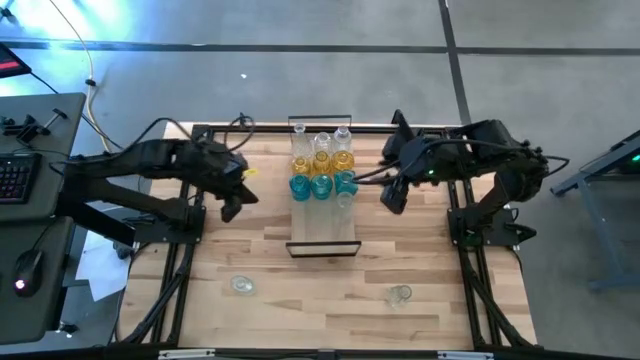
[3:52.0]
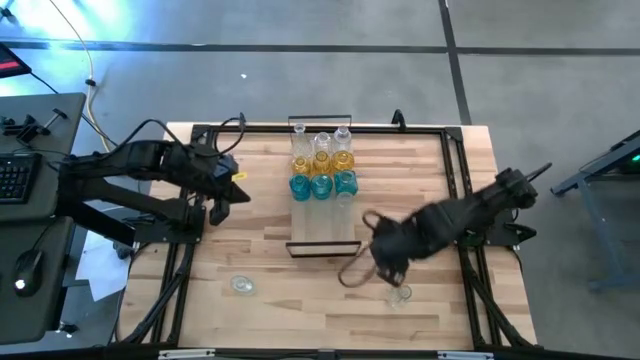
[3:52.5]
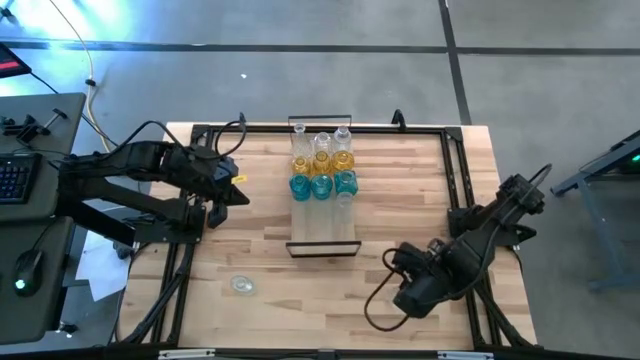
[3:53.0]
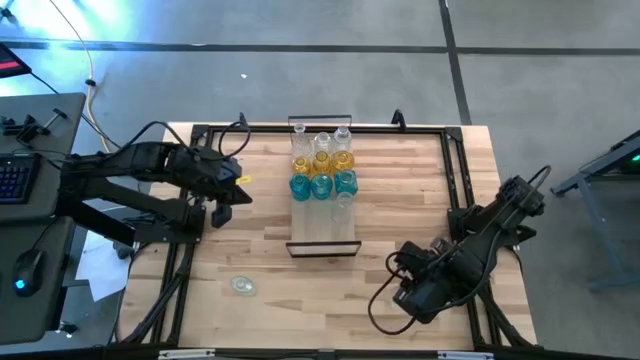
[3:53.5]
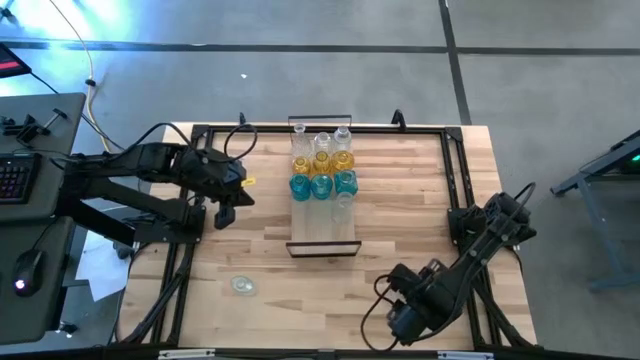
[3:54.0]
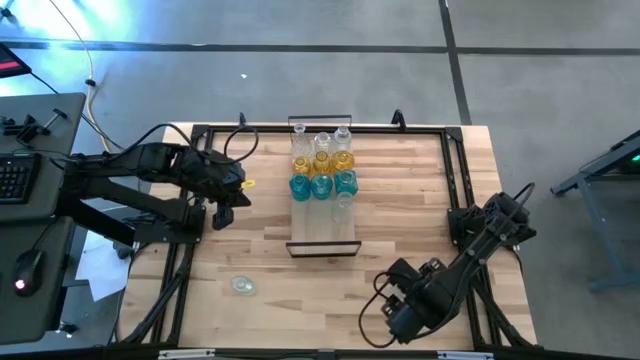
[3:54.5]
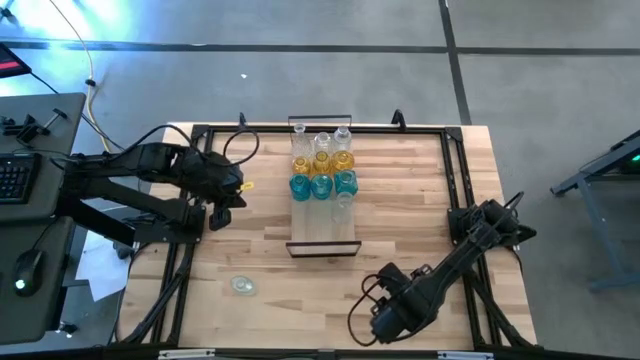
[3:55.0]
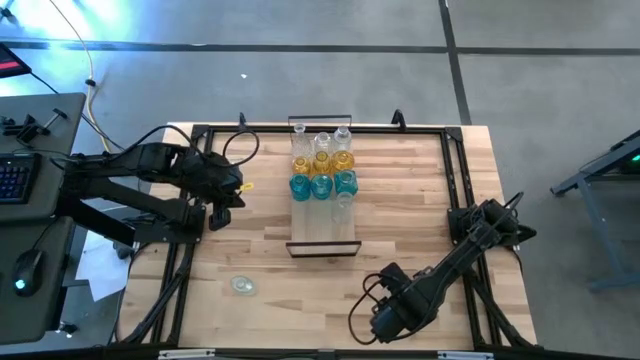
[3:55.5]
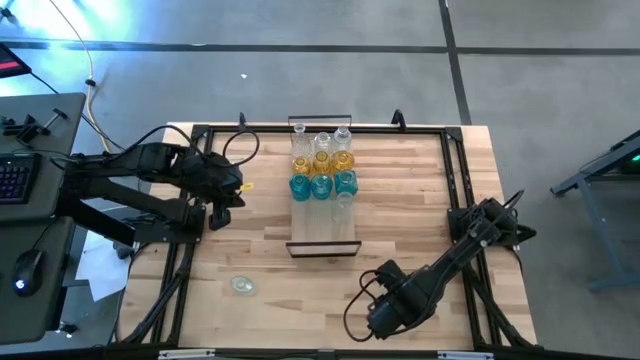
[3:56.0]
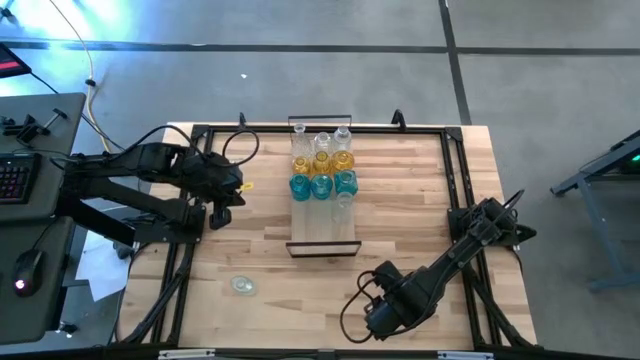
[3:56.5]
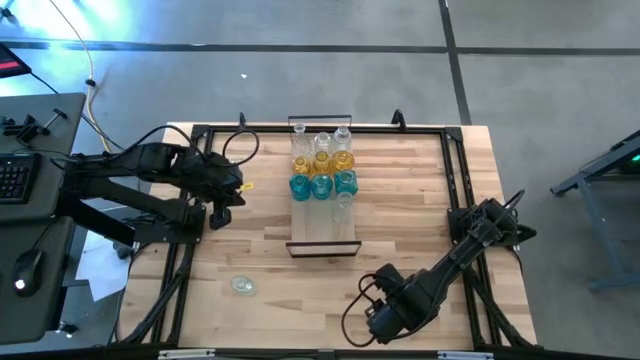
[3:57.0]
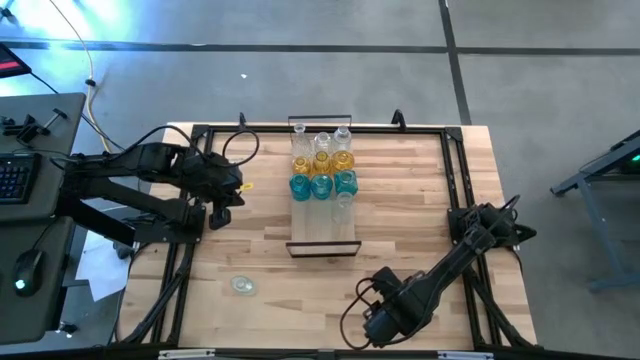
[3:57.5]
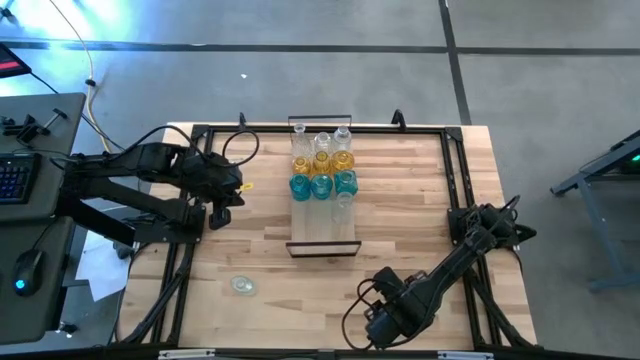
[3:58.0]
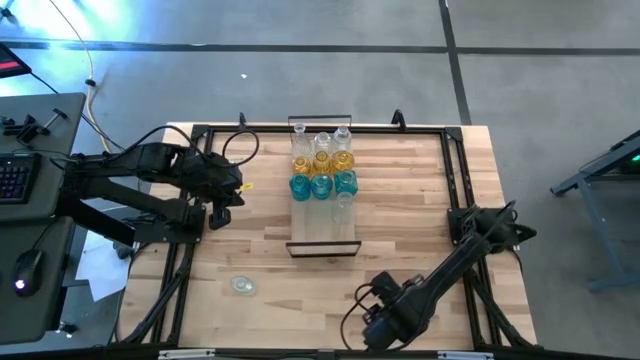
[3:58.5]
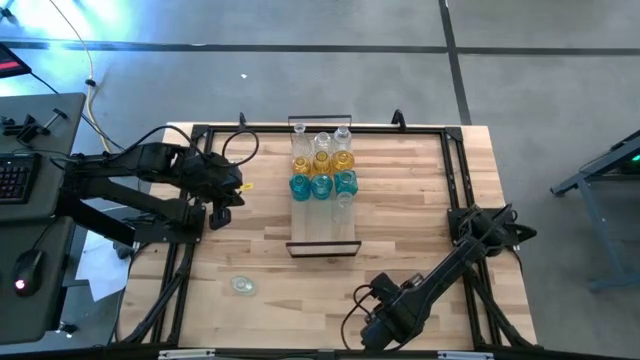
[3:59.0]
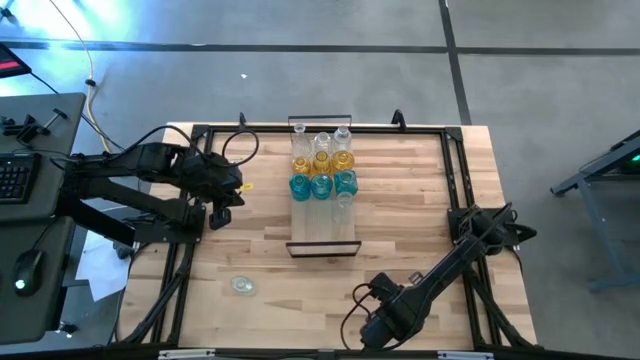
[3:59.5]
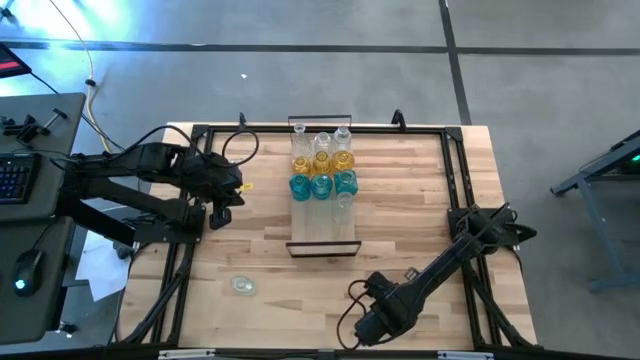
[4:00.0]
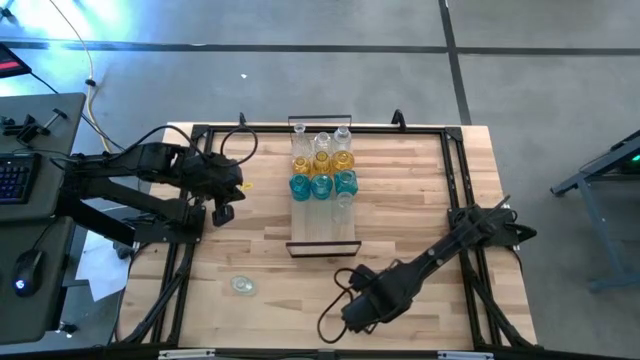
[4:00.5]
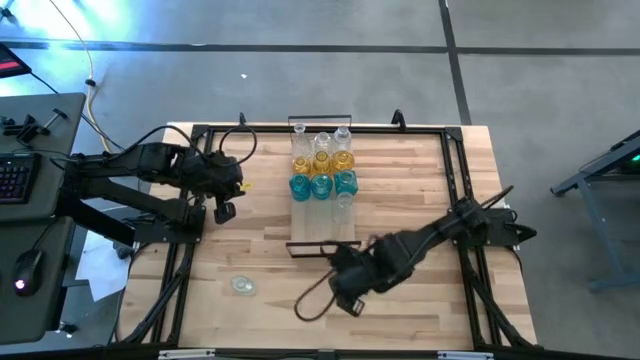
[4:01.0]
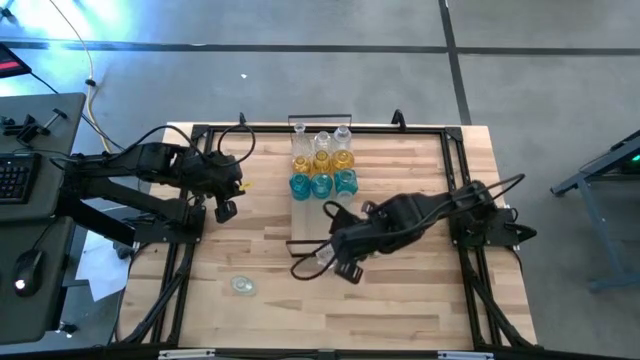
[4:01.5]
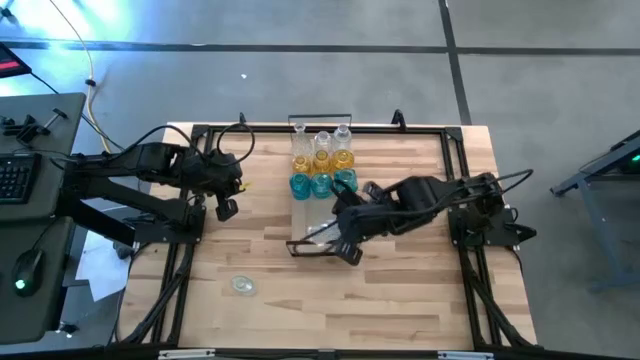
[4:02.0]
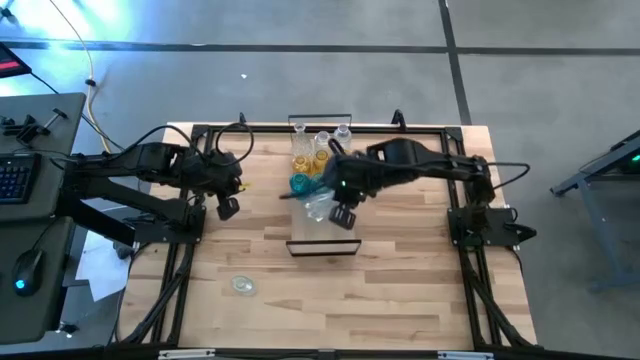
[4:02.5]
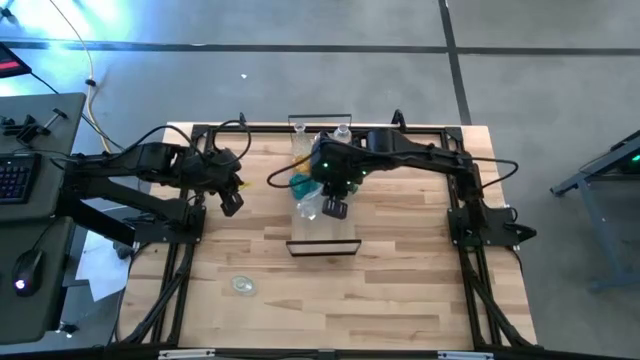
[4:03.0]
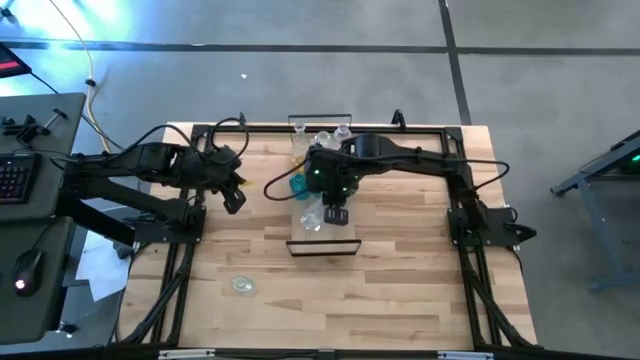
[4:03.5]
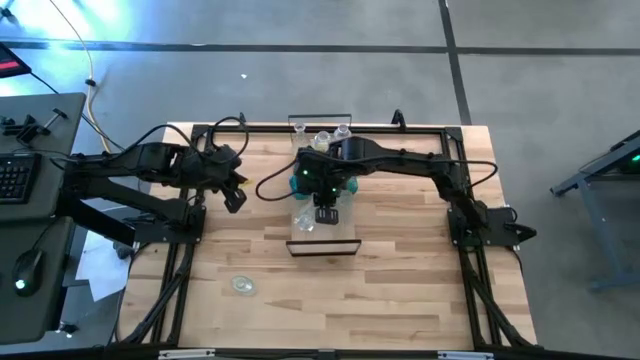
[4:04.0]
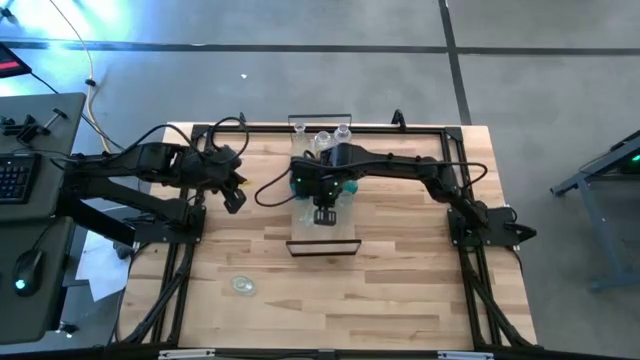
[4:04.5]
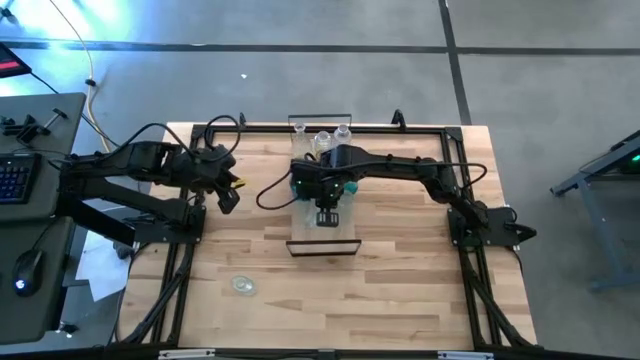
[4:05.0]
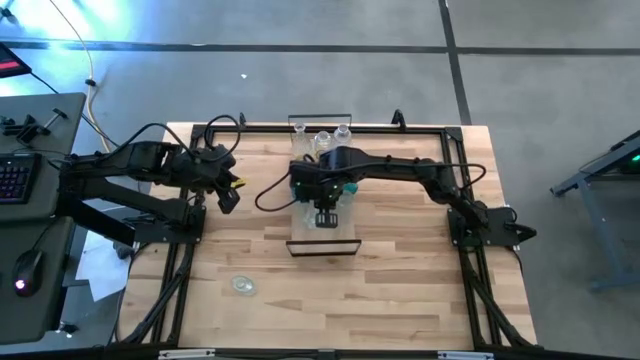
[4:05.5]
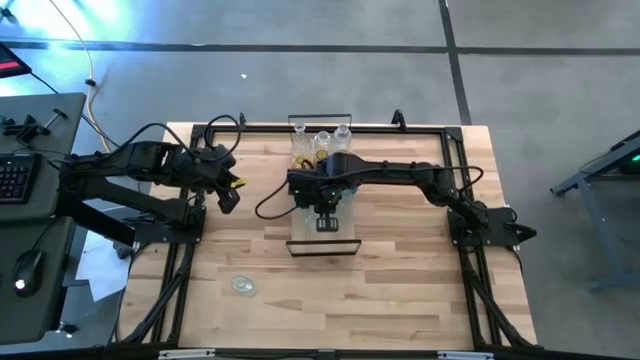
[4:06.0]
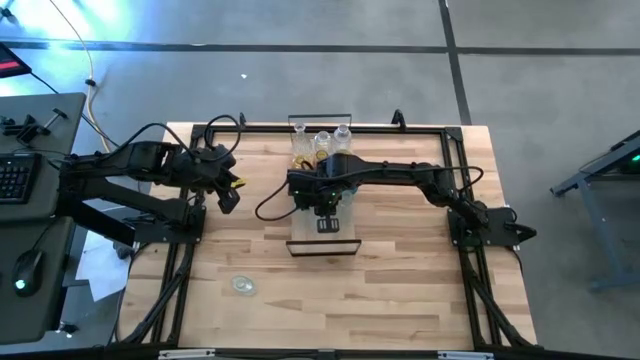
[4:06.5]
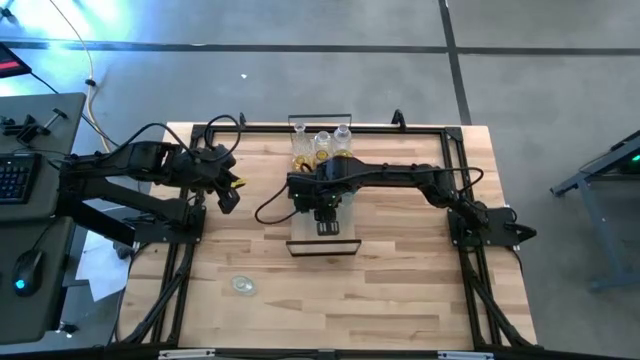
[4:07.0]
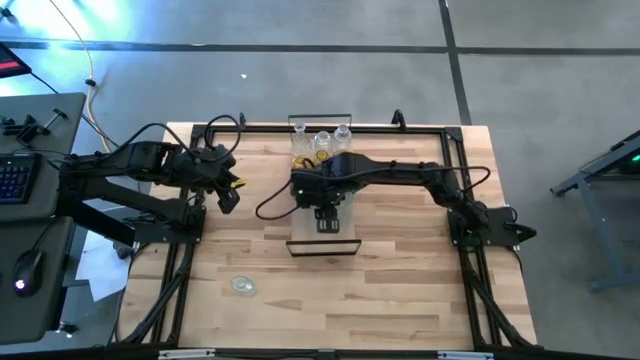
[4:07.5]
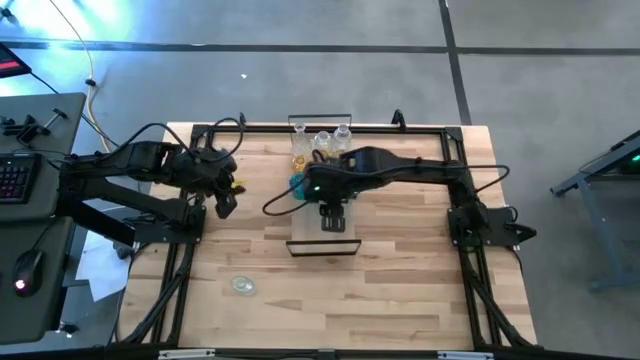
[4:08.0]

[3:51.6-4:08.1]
Task: sort vases onto shelf
Put the right transparent flower vase on the shelf aligned with the other transparent flower vase

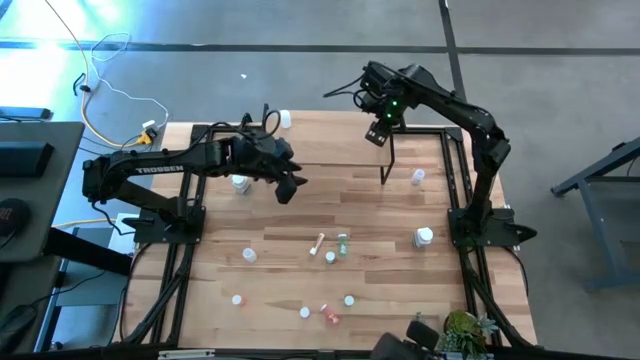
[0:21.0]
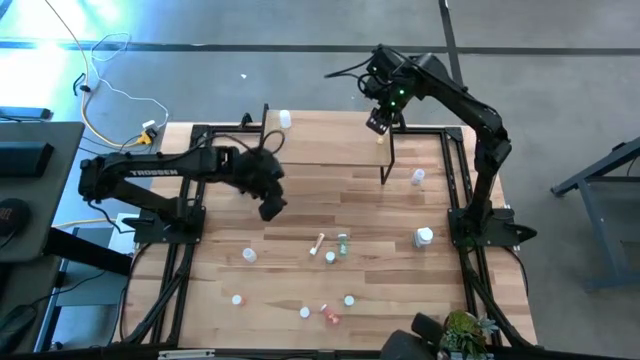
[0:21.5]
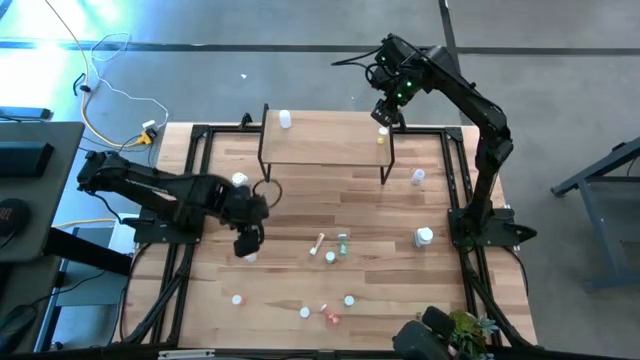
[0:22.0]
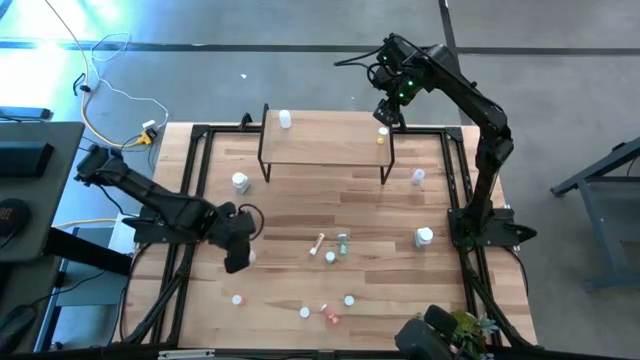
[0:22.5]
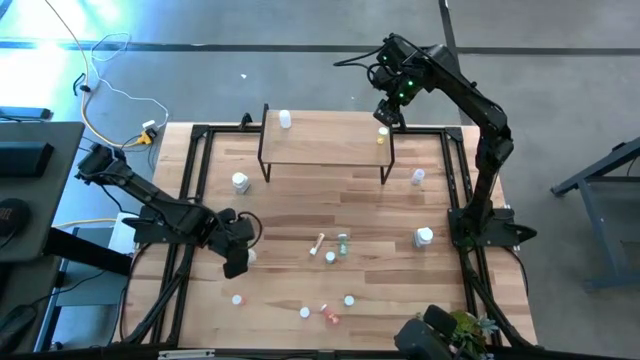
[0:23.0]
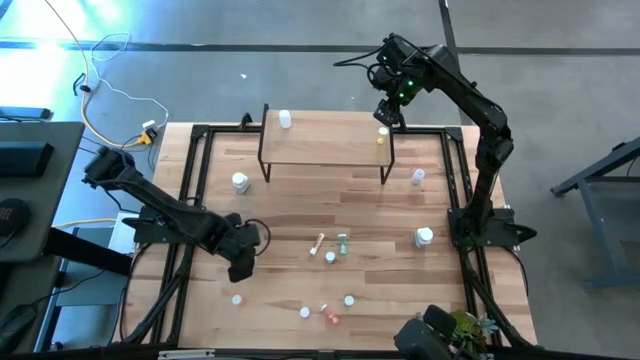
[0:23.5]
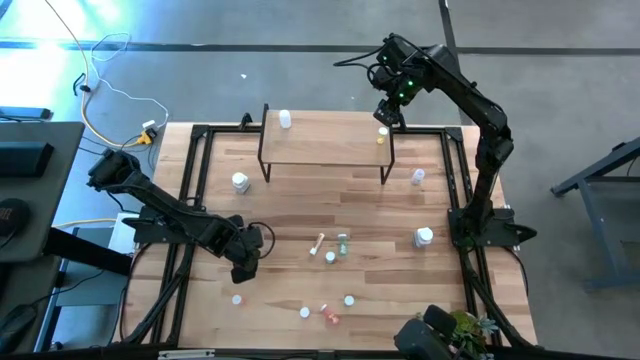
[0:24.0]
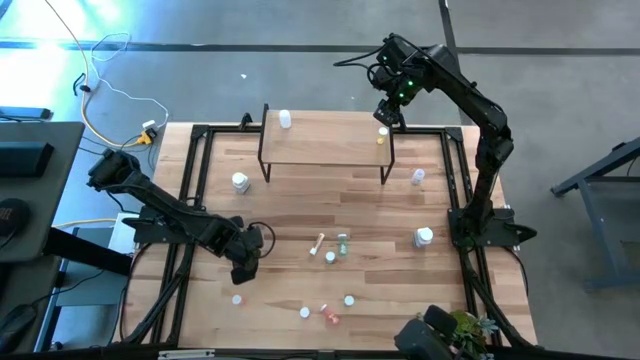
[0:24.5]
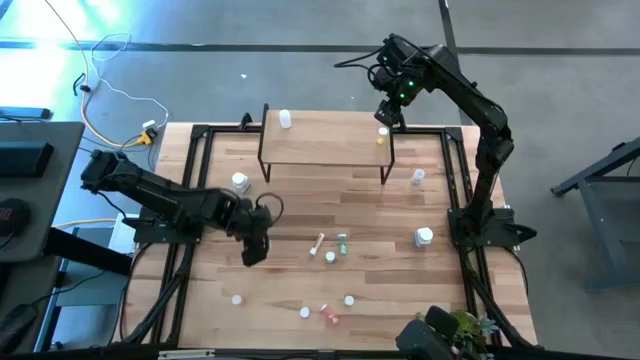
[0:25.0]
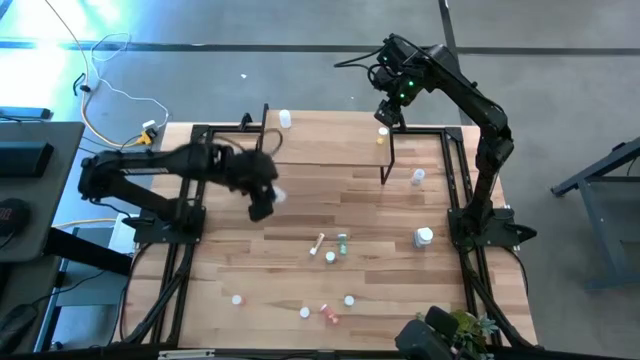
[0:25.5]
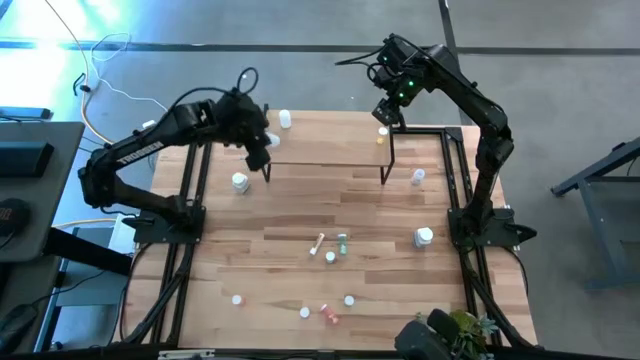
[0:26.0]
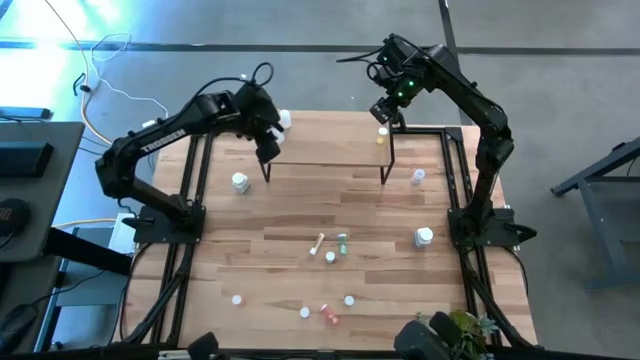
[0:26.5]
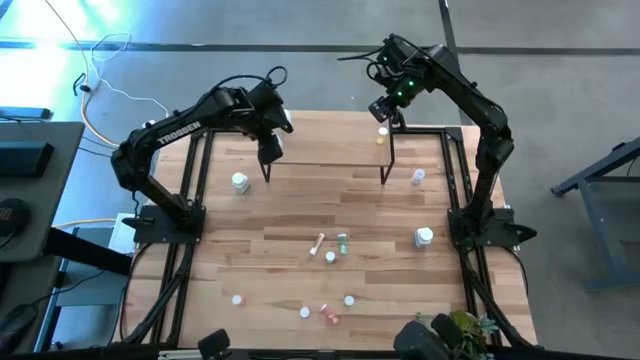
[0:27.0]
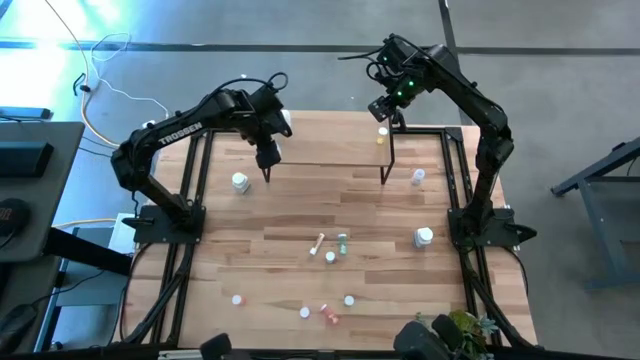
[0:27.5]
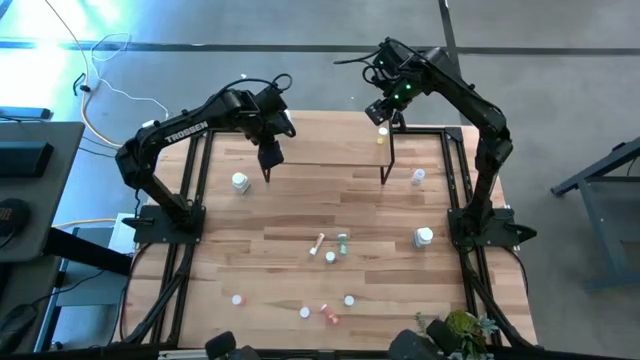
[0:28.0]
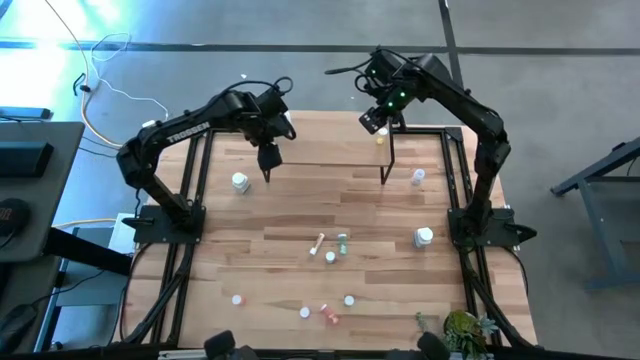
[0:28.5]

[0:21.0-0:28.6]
Task: Pick and place medicine bottles onto shelf by color
Put the small white pill bottle on the shelf
